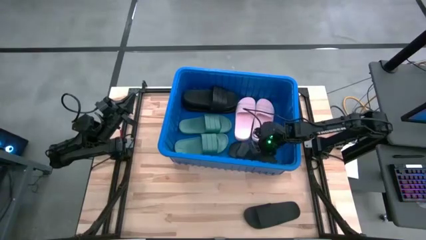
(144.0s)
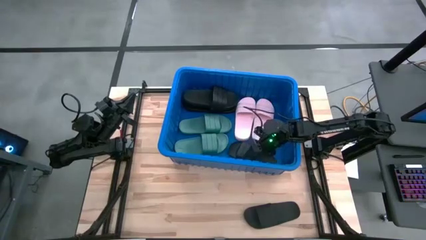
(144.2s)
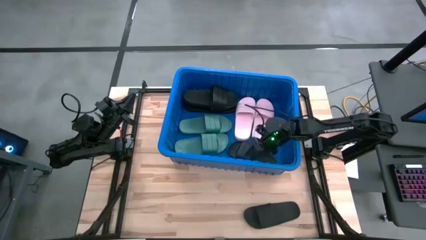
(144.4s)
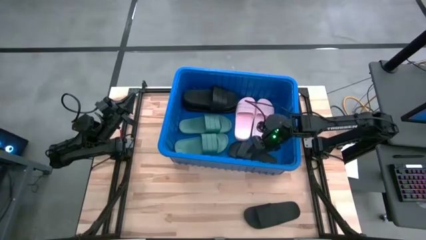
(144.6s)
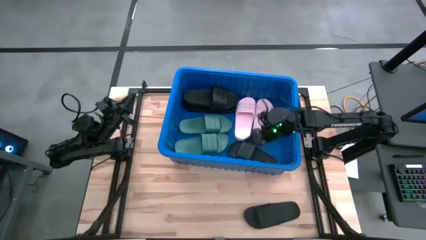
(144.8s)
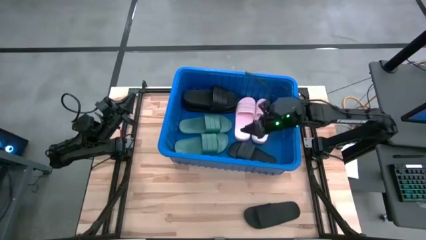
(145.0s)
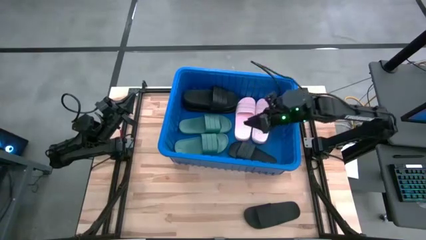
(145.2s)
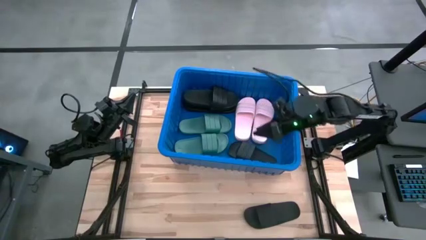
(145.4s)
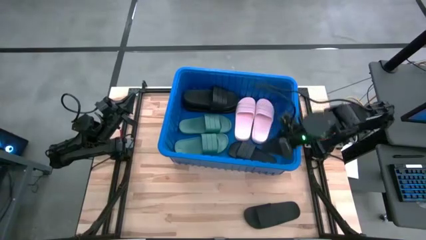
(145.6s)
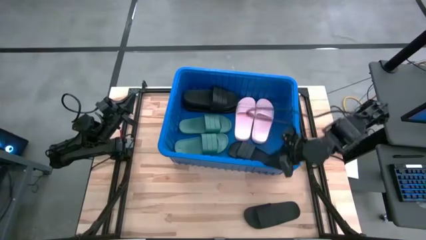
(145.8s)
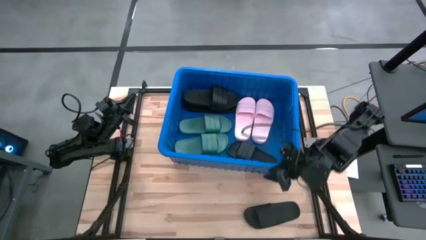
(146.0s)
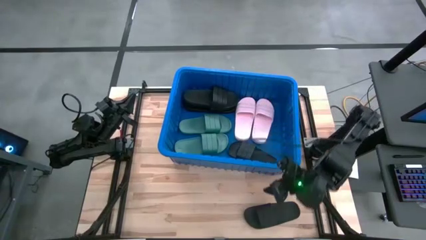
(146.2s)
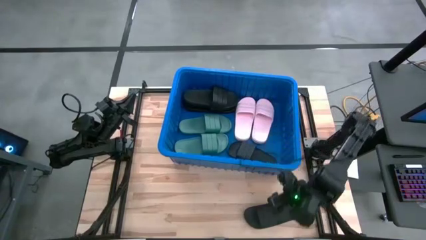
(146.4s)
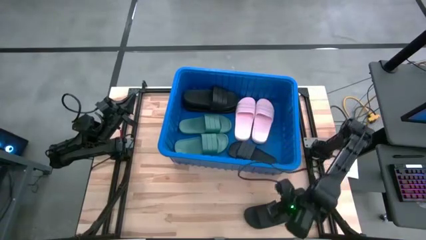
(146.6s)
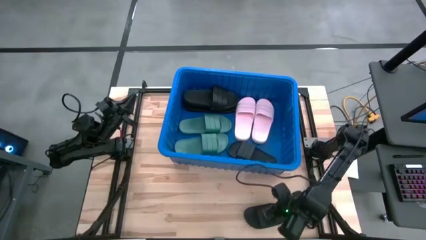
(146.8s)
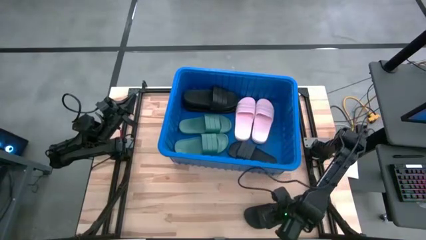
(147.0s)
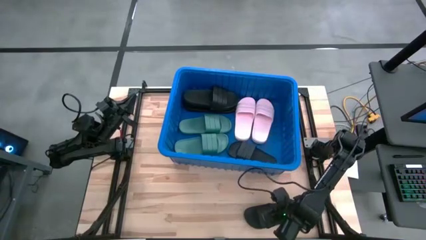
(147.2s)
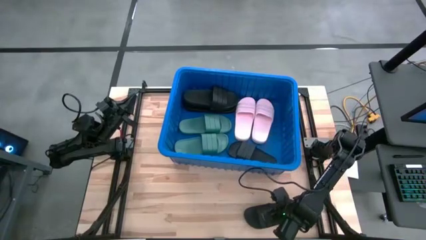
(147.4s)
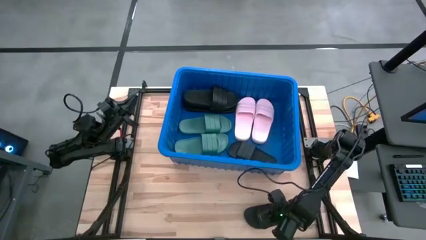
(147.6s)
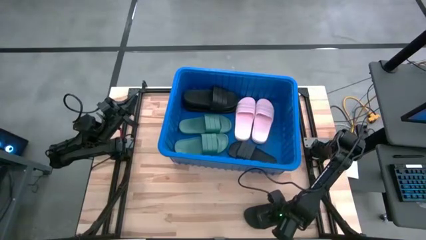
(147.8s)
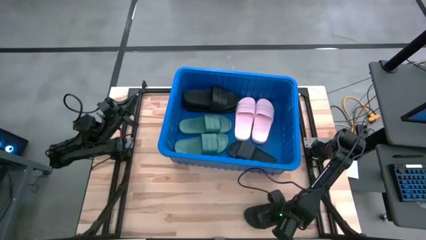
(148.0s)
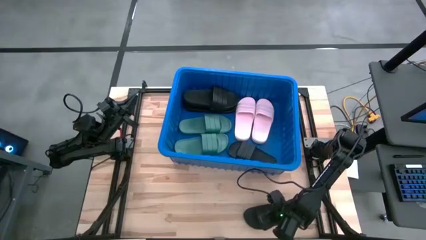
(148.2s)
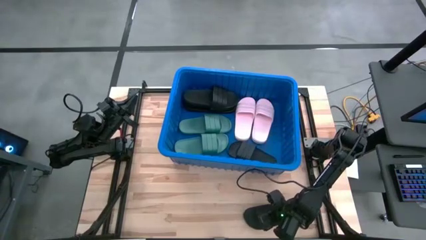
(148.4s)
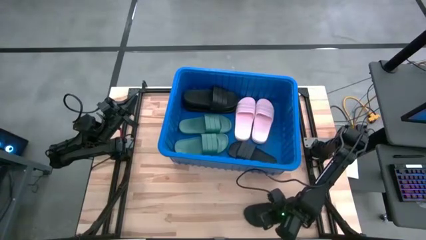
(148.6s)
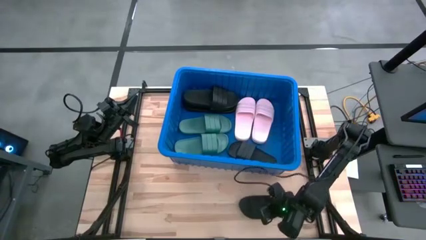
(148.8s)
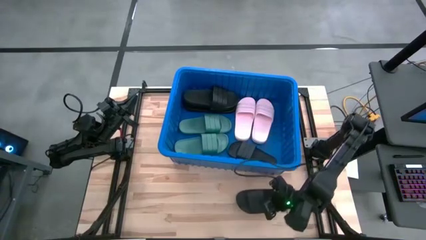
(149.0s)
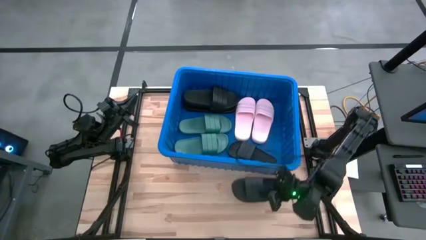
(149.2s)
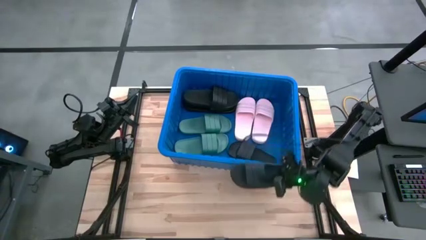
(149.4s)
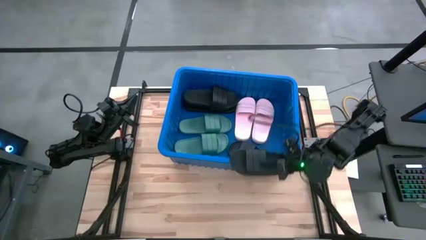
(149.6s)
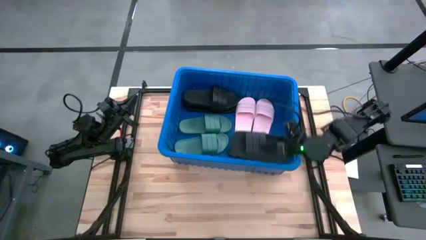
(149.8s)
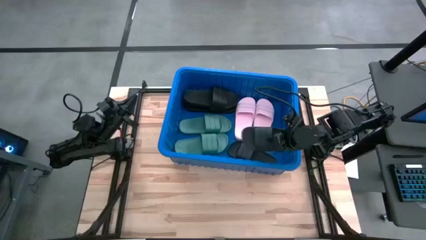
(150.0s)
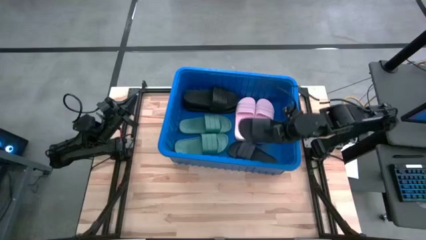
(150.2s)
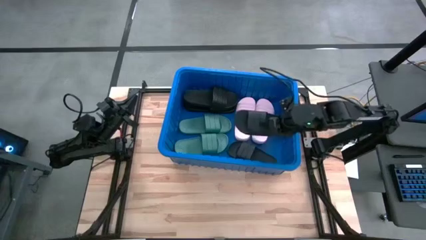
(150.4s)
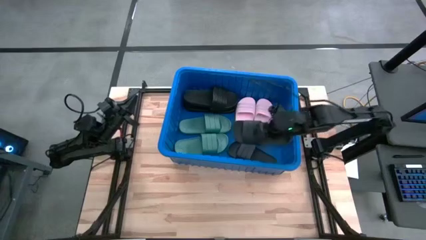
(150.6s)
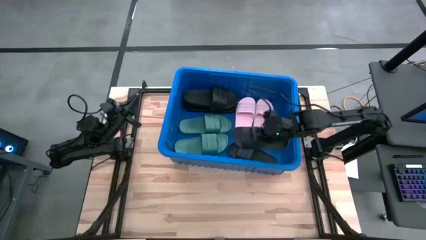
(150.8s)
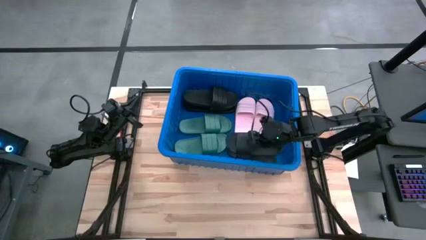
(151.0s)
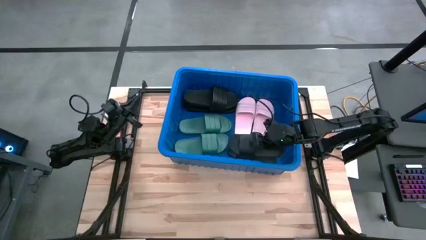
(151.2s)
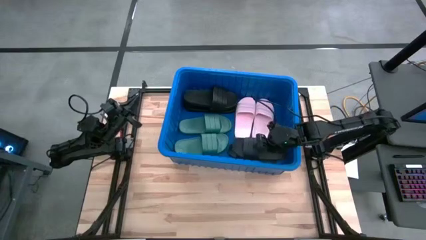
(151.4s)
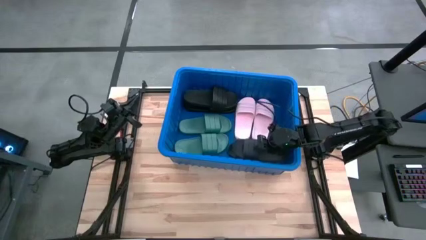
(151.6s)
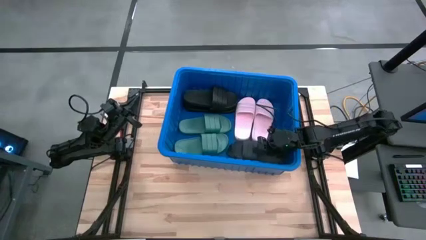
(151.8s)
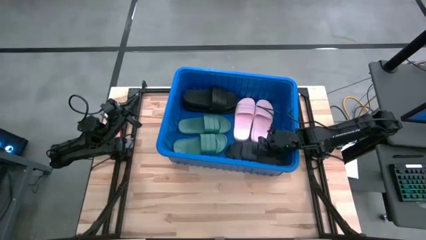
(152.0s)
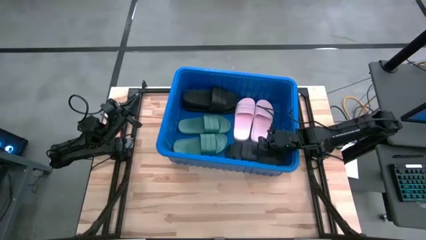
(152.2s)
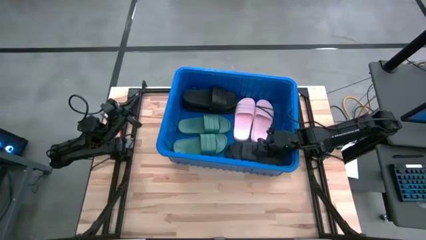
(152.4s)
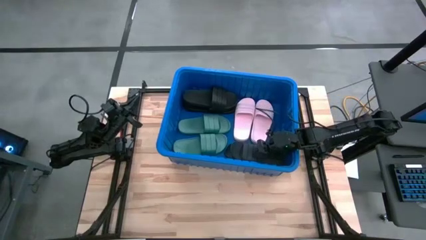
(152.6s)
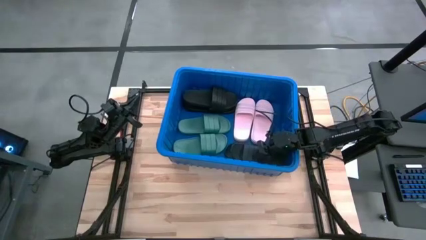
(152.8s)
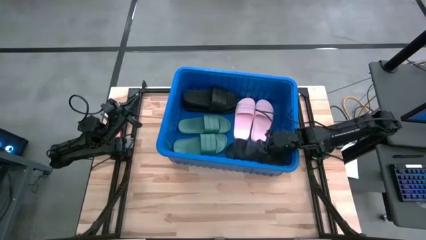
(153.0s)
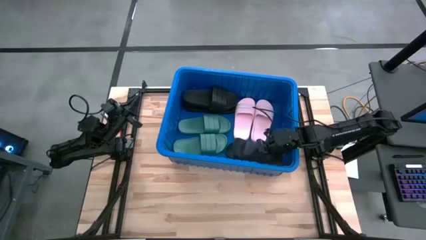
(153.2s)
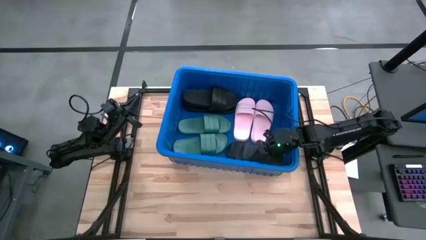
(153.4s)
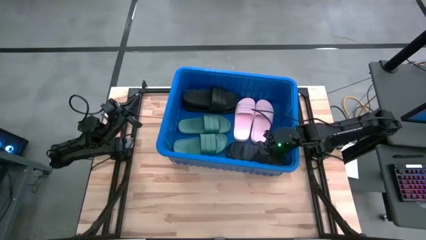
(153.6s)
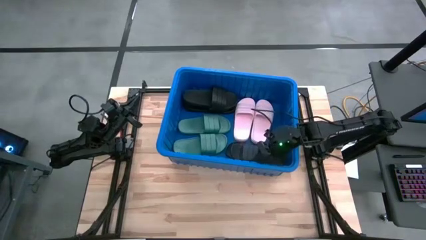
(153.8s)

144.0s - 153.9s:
Task: Pick and place slides into bin
Stack the black slipper on top of the black slipper in the blue bin
